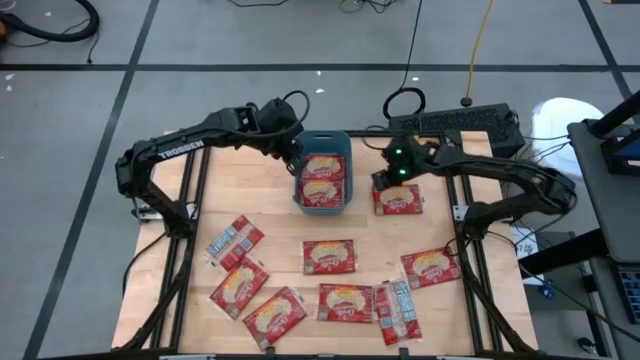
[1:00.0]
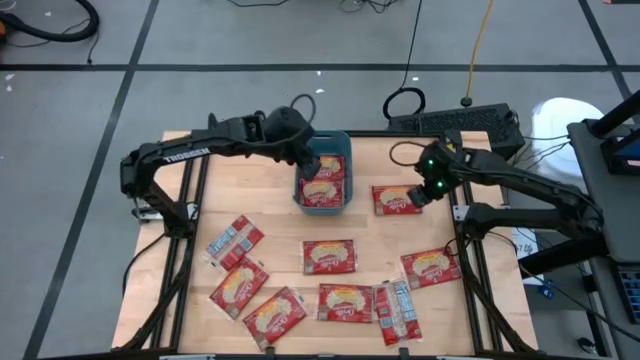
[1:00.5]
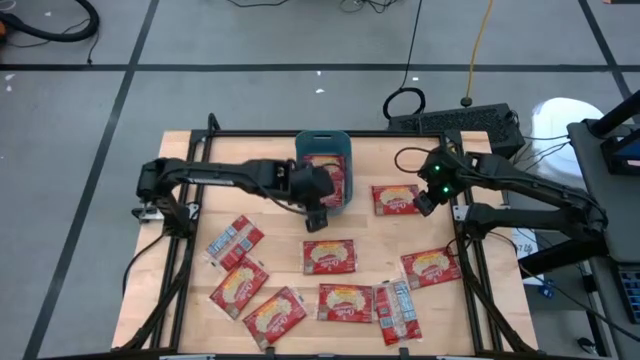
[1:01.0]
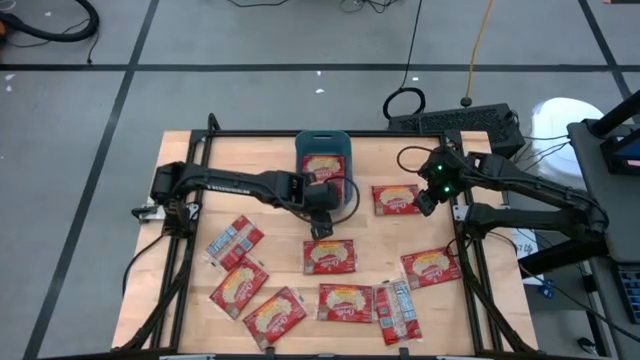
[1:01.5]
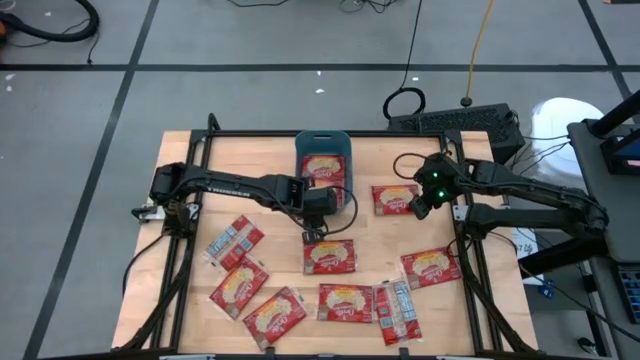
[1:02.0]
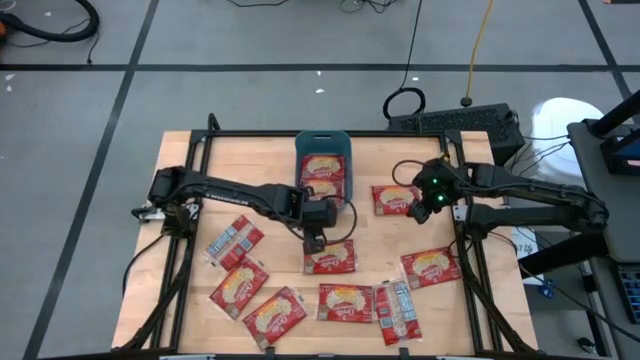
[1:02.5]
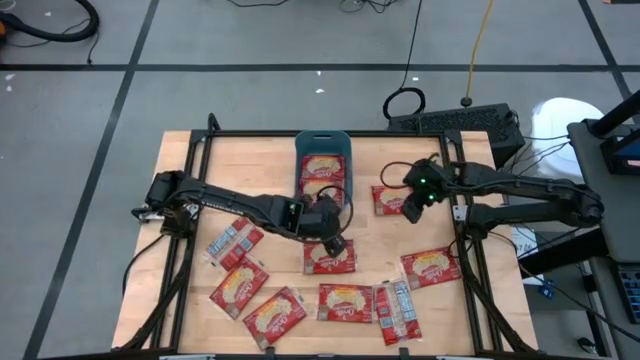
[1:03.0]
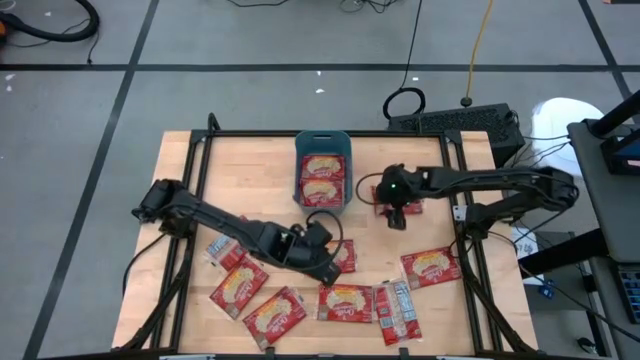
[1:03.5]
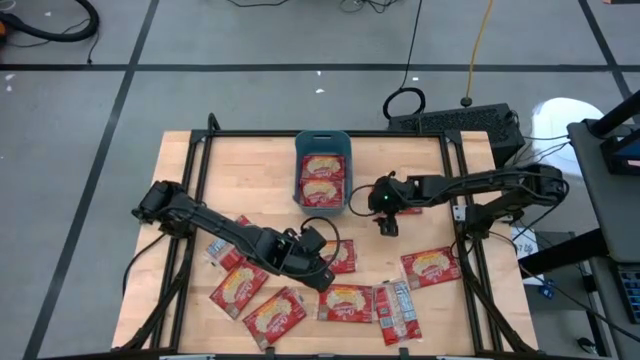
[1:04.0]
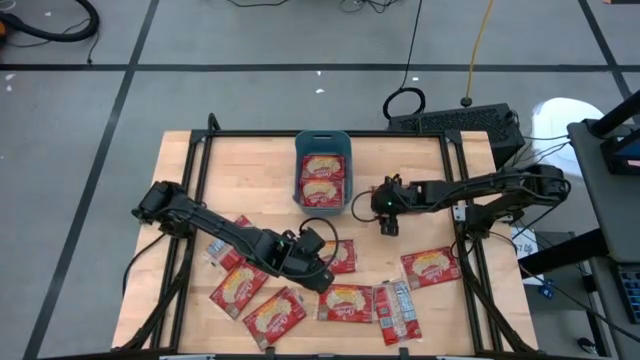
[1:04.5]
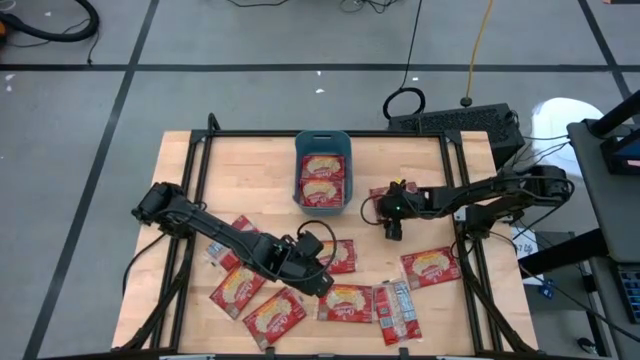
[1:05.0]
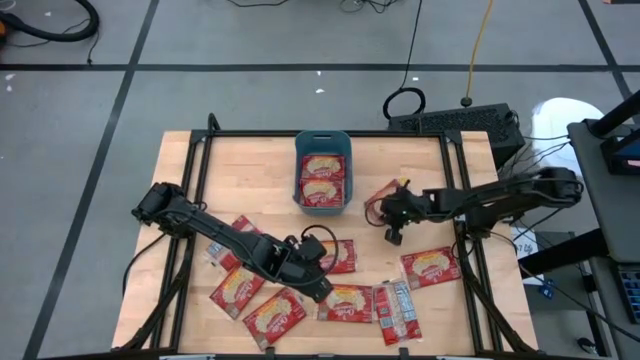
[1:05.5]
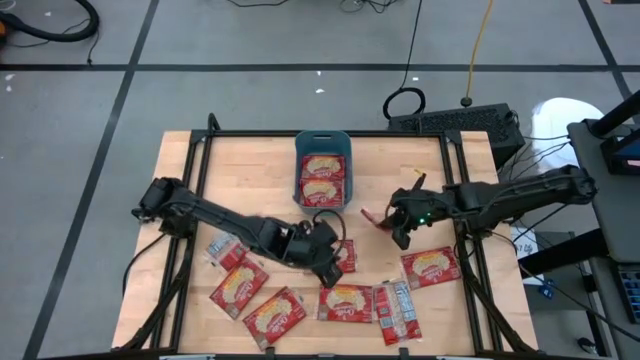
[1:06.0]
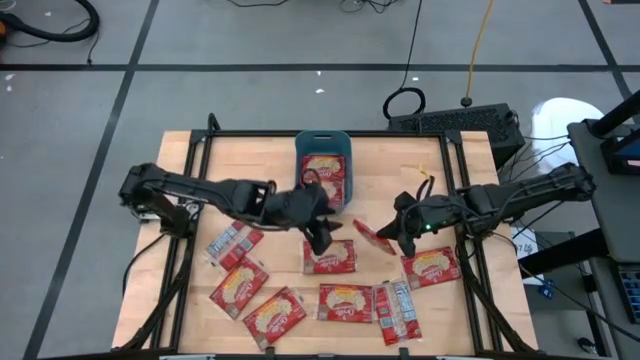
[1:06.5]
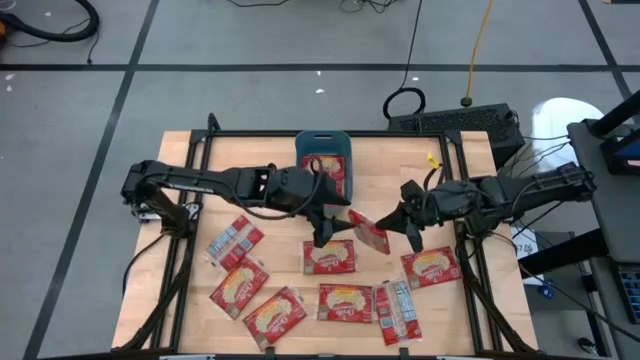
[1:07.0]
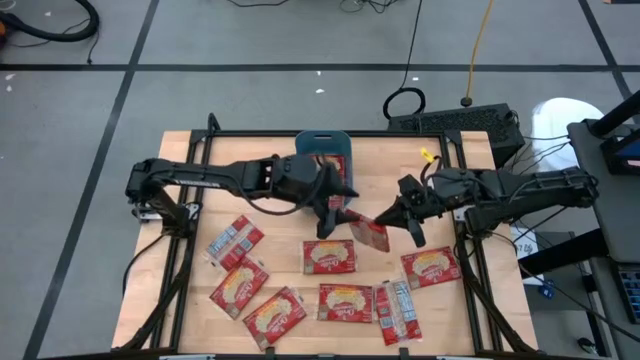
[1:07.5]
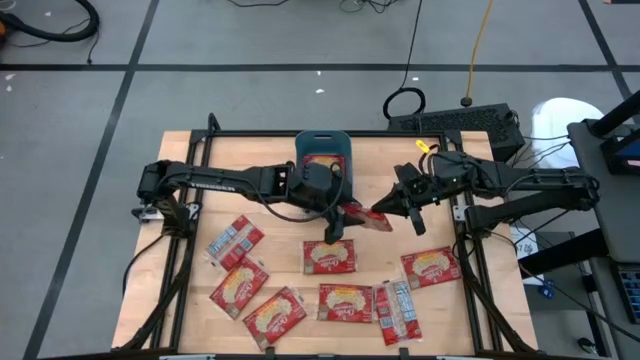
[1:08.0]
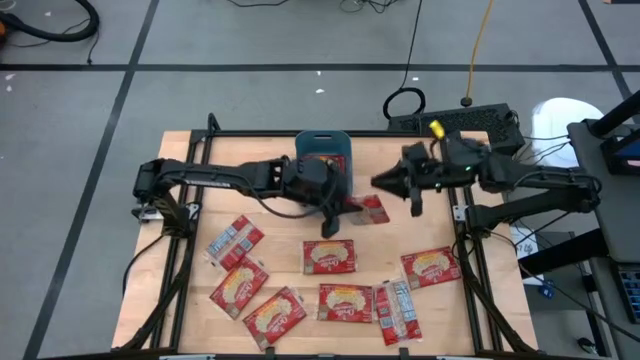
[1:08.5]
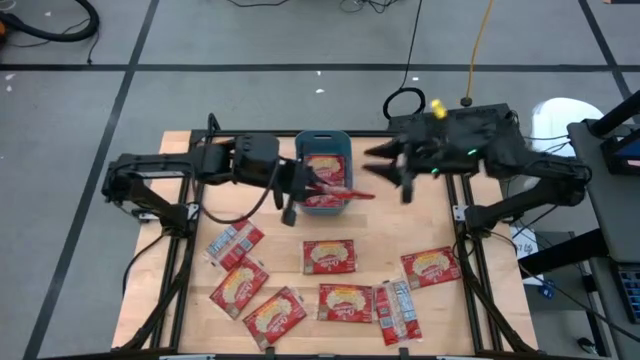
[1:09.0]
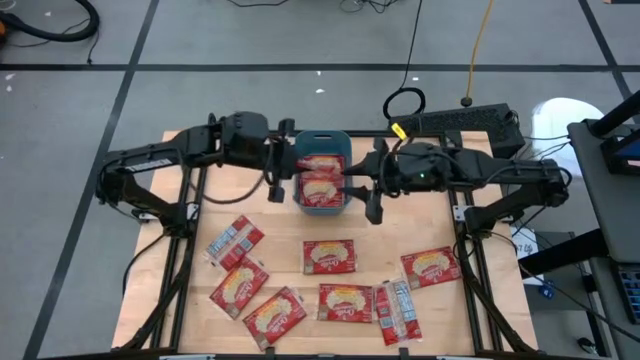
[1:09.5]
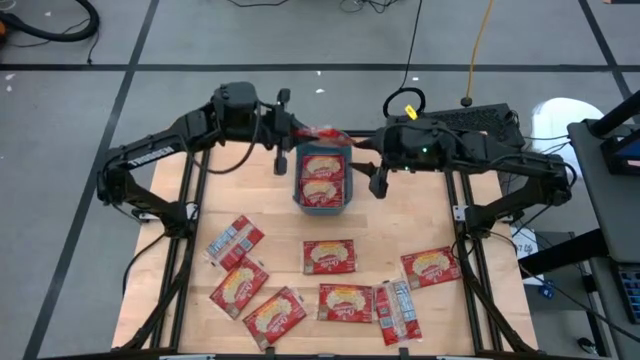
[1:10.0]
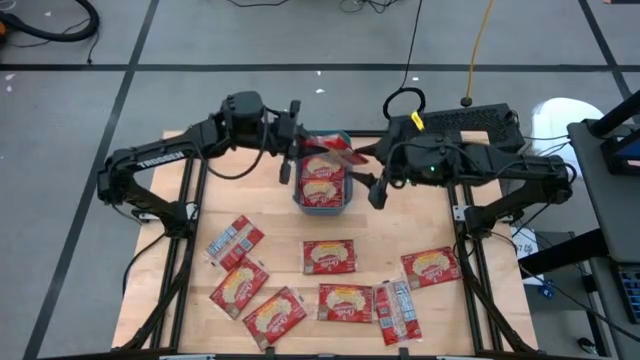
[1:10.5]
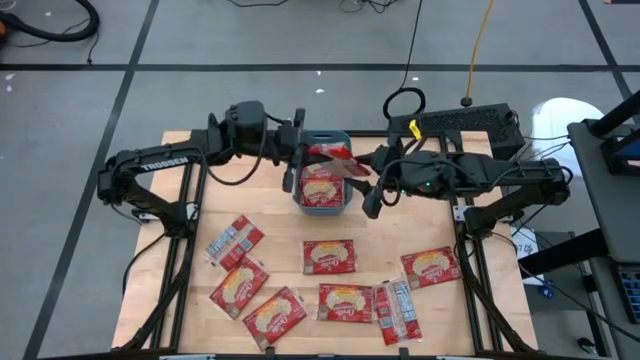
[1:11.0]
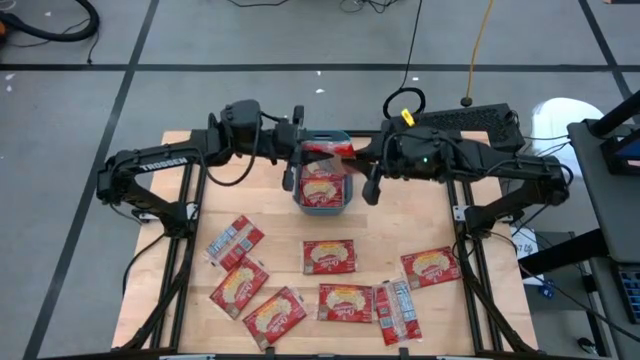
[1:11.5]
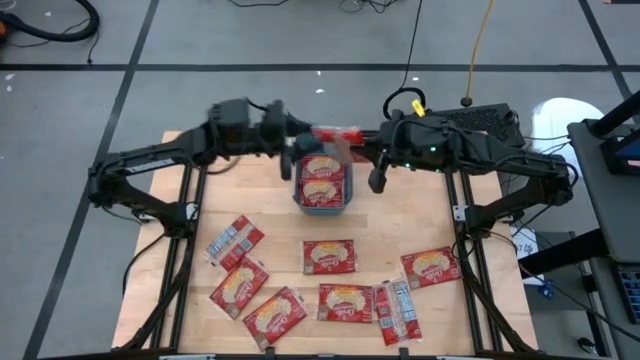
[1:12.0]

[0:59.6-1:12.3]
Task: Sort popcorn bags into baskets
Put the red popcorn bag into the blue bin

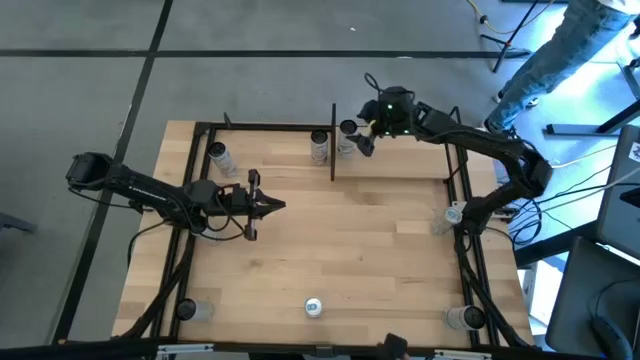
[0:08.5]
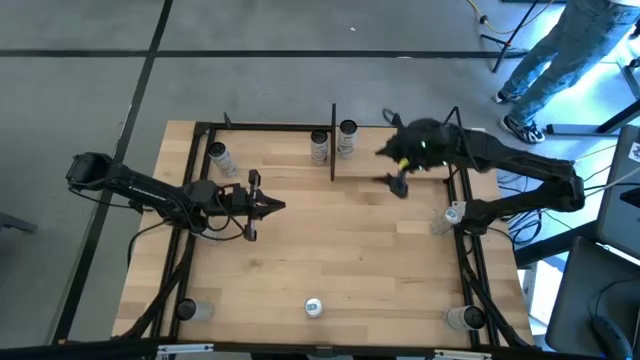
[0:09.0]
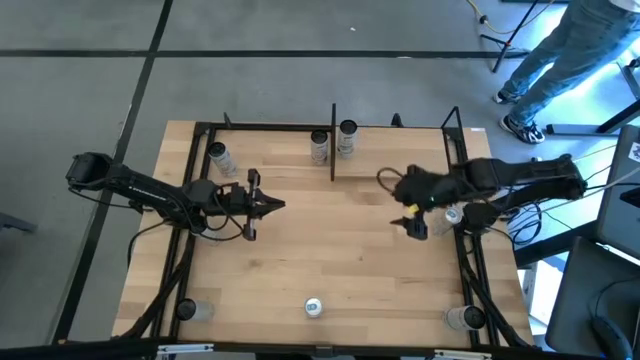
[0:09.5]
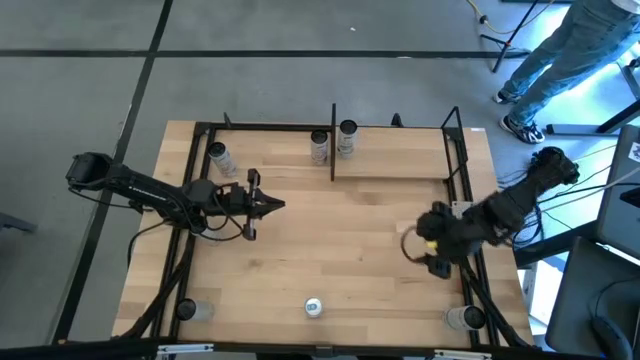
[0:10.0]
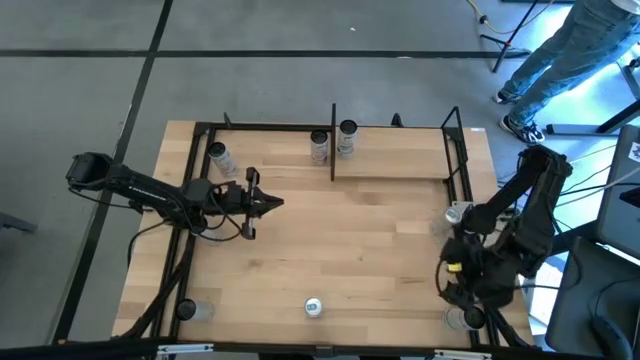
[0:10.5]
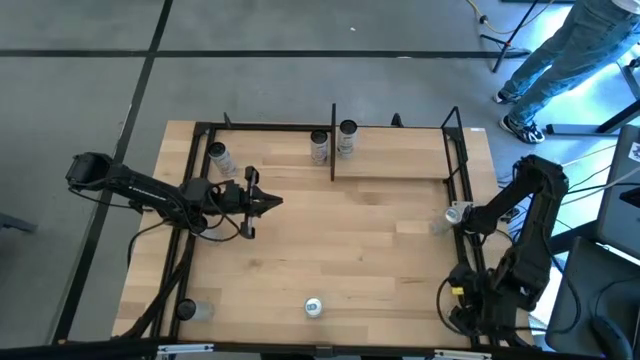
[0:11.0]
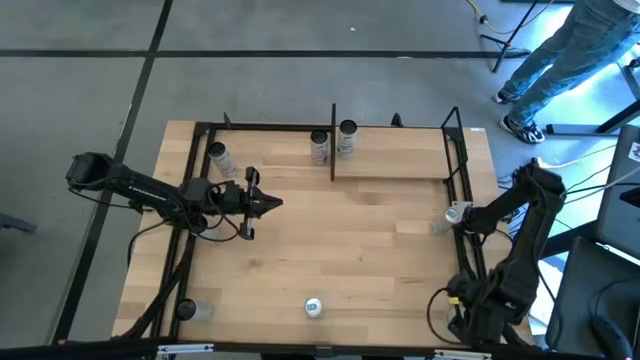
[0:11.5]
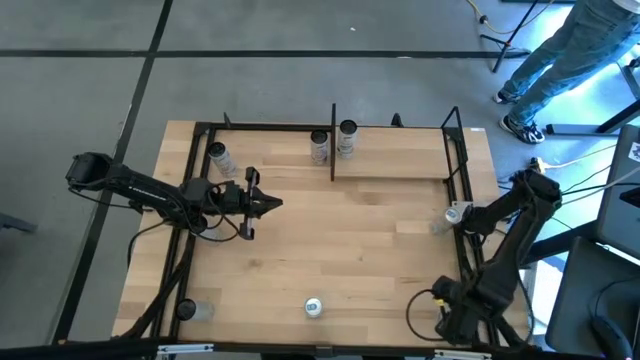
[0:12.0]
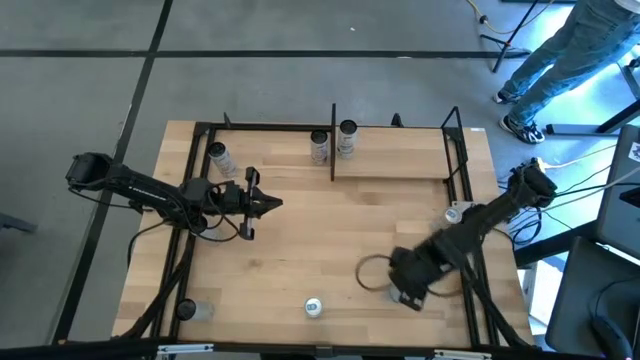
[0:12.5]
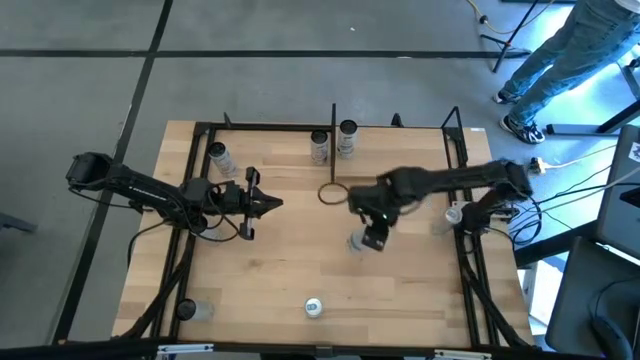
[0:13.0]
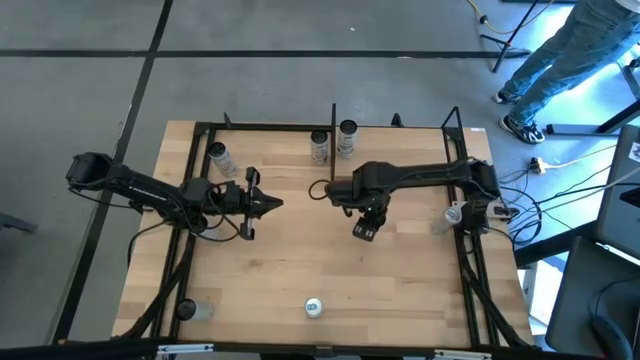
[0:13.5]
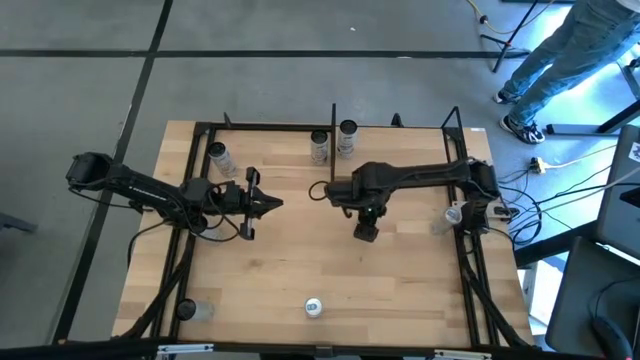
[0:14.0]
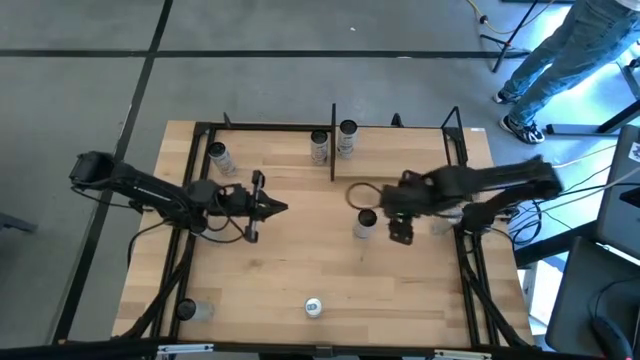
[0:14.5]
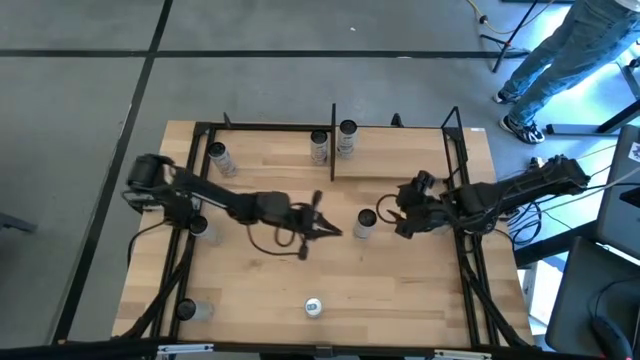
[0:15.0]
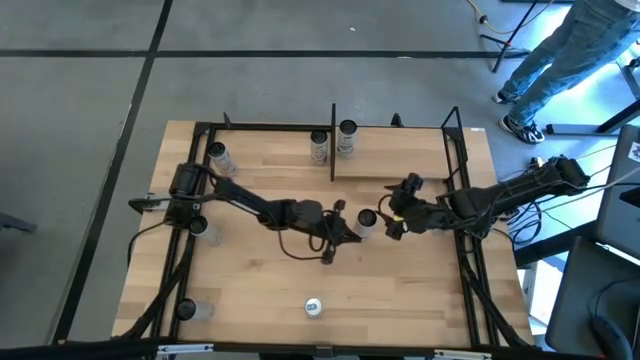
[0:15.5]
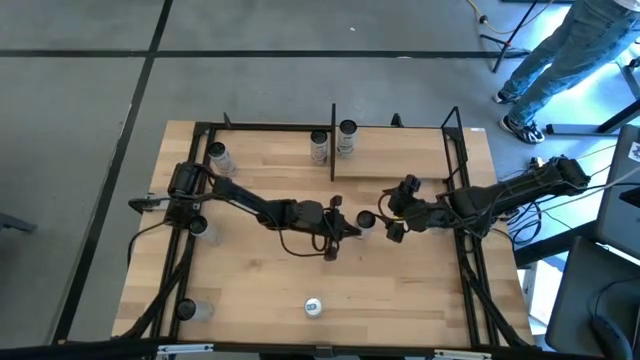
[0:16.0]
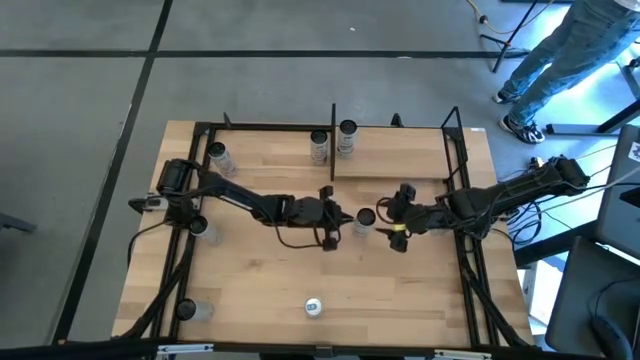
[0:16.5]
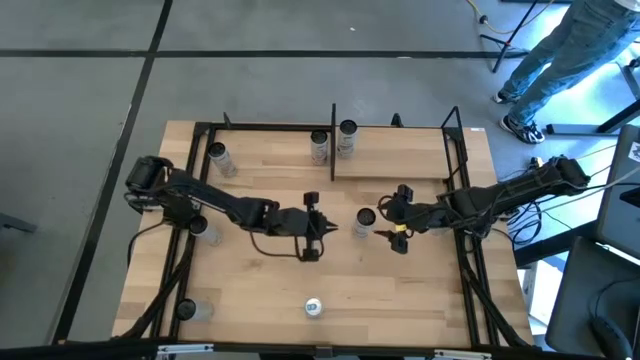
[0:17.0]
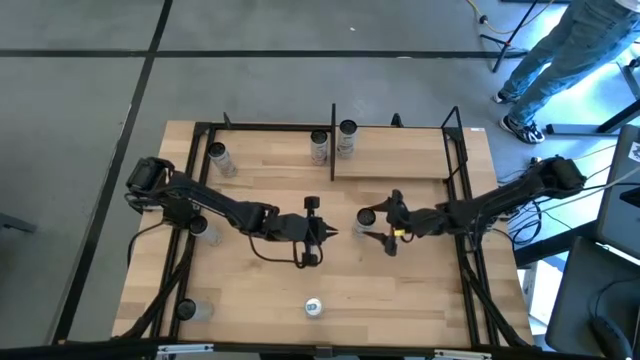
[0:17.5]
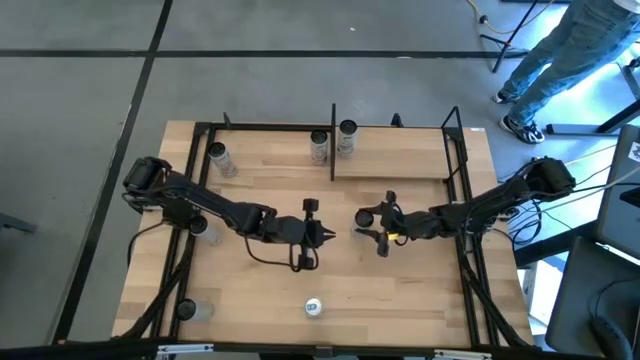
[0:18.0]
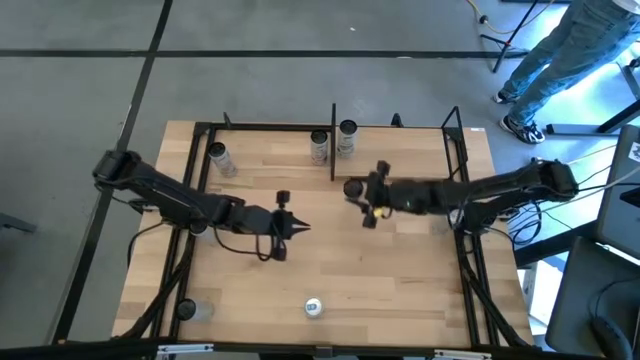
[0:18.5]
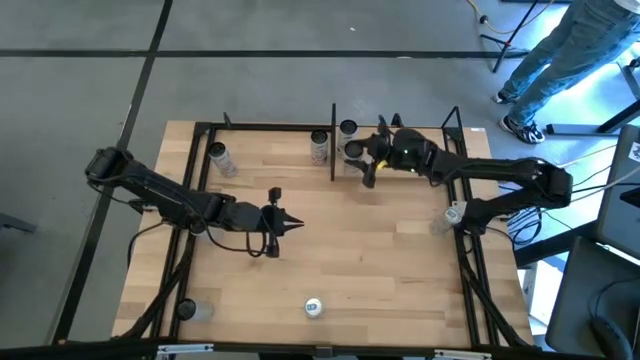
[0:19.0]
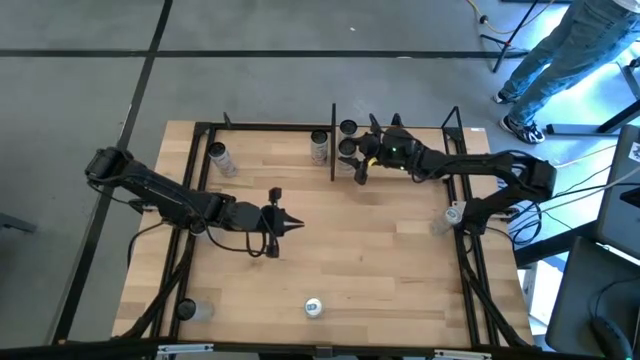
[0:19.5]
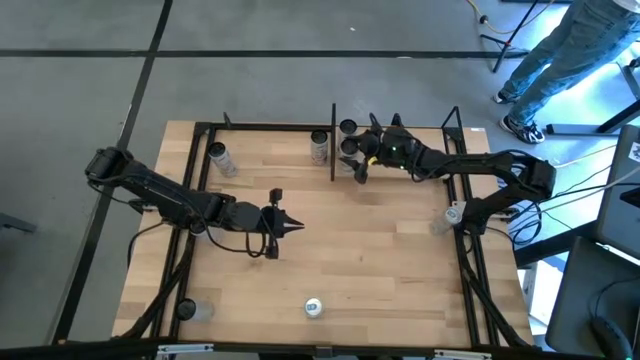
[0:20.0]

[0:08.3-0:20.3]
Task: Place canned beverage on shelf
Put the bottom right black soda can on the shelf aligned with the other black soda can
